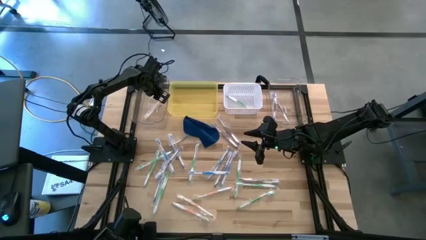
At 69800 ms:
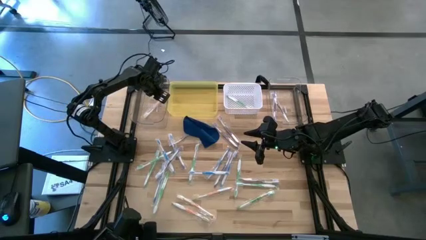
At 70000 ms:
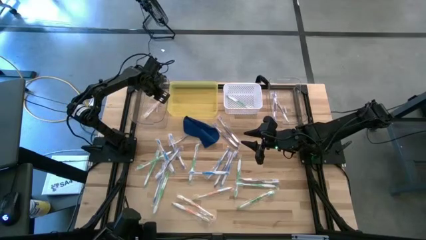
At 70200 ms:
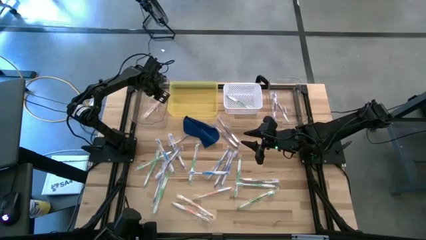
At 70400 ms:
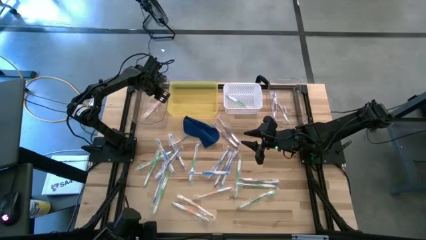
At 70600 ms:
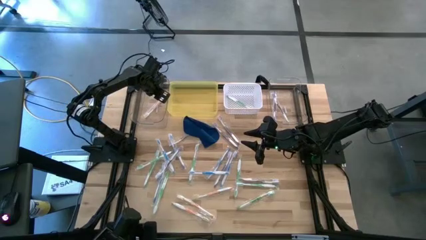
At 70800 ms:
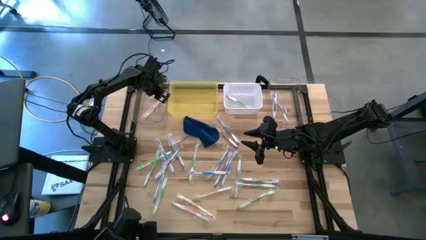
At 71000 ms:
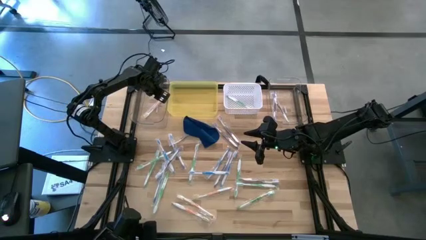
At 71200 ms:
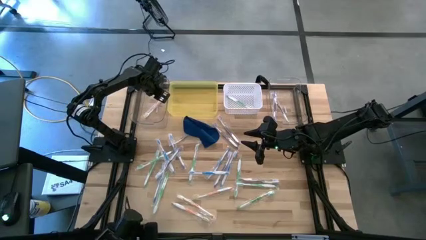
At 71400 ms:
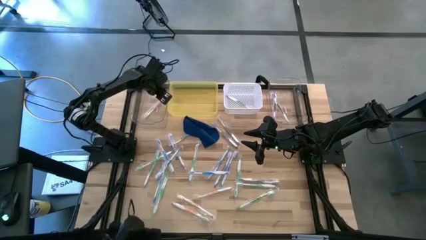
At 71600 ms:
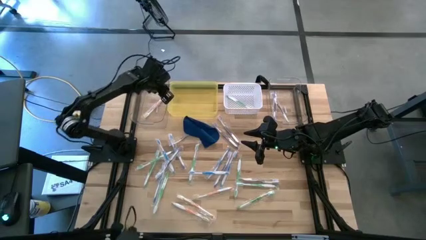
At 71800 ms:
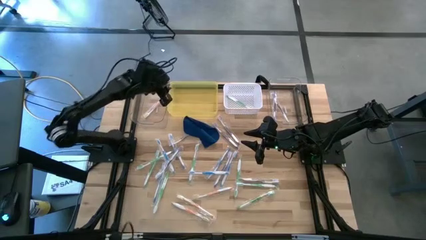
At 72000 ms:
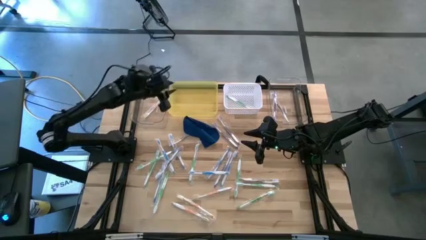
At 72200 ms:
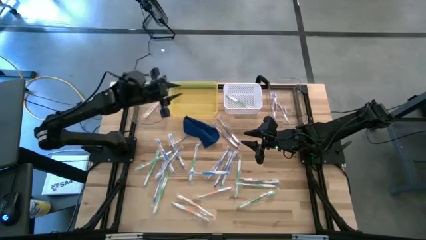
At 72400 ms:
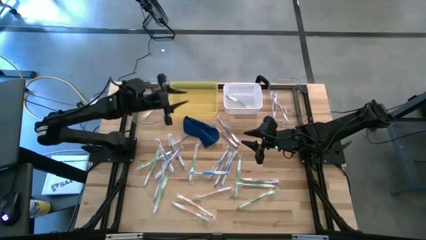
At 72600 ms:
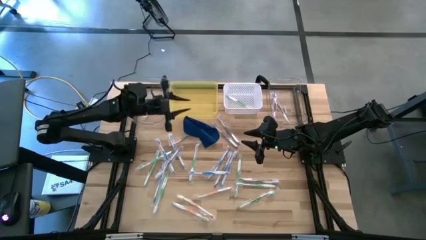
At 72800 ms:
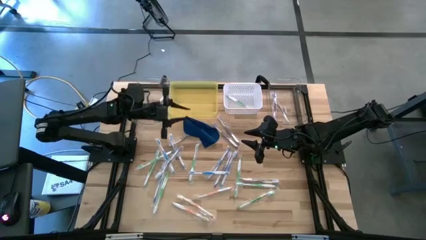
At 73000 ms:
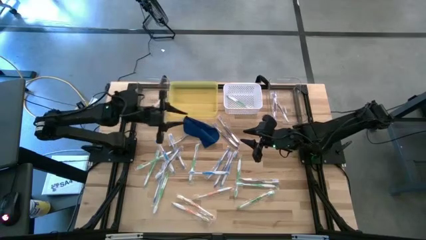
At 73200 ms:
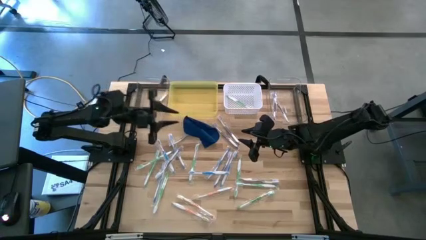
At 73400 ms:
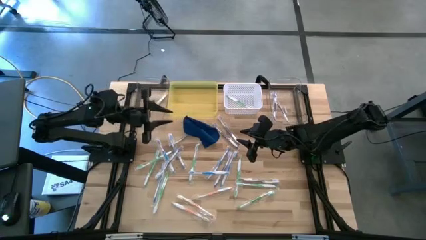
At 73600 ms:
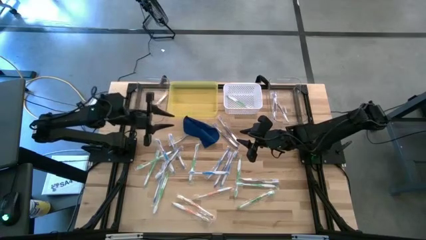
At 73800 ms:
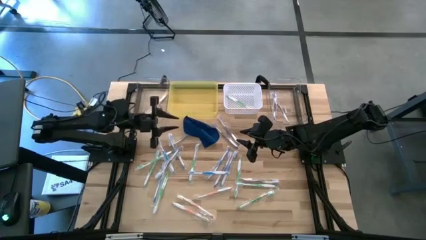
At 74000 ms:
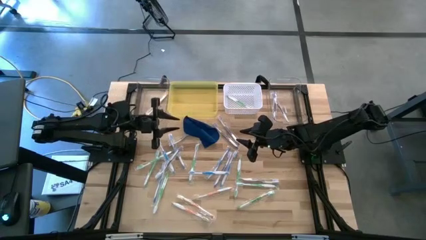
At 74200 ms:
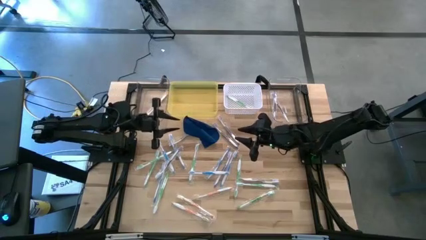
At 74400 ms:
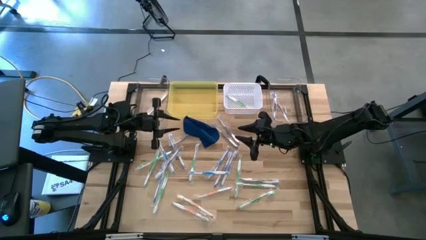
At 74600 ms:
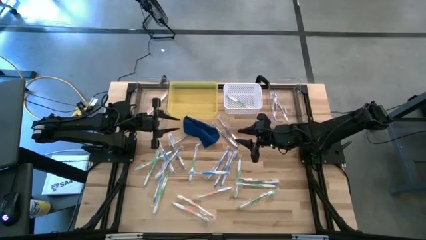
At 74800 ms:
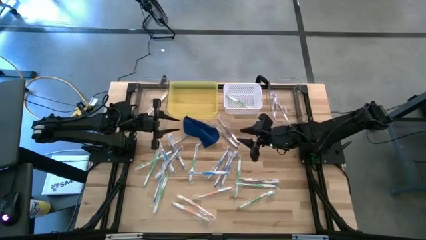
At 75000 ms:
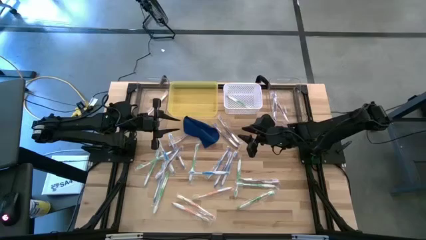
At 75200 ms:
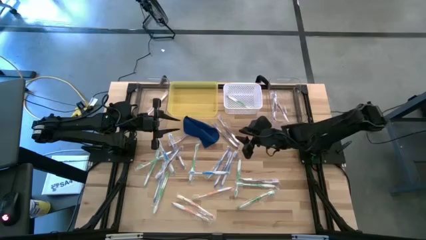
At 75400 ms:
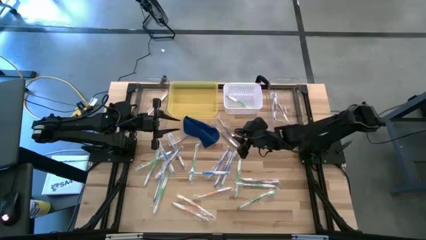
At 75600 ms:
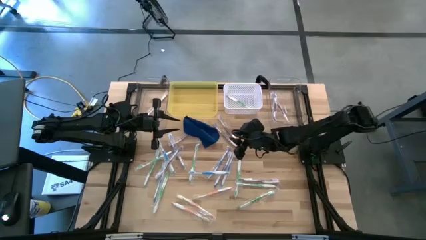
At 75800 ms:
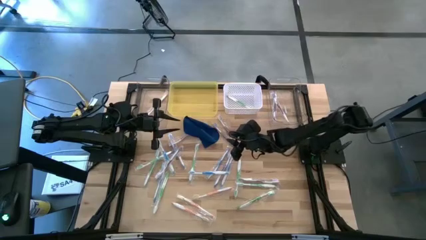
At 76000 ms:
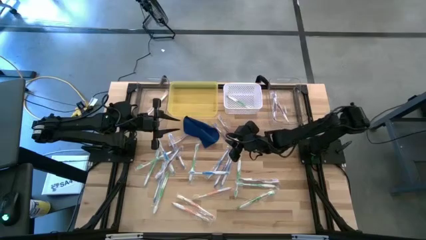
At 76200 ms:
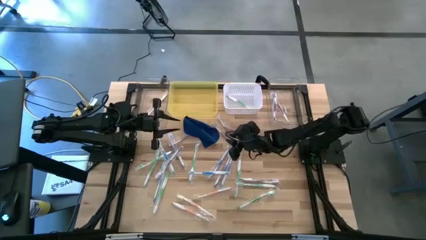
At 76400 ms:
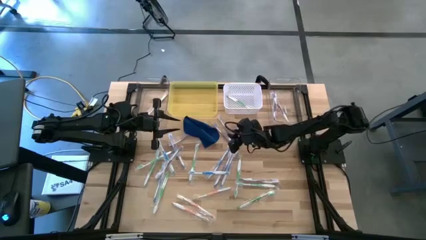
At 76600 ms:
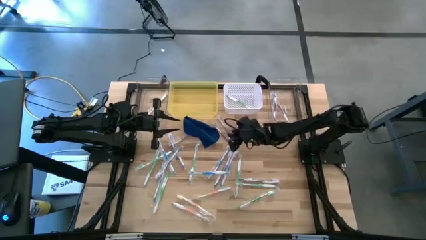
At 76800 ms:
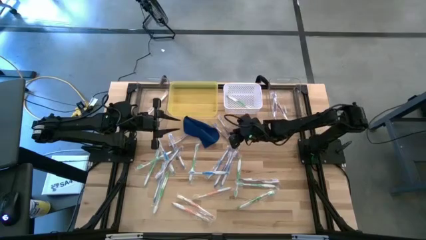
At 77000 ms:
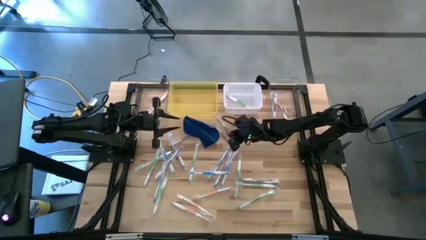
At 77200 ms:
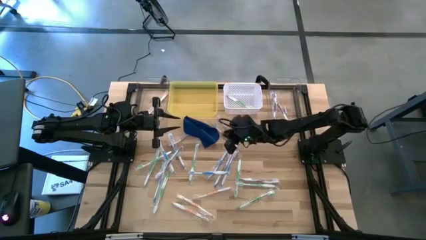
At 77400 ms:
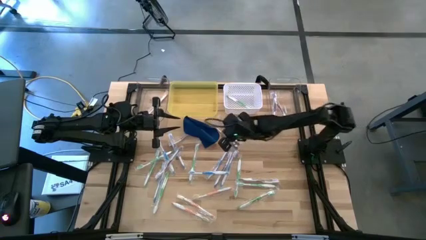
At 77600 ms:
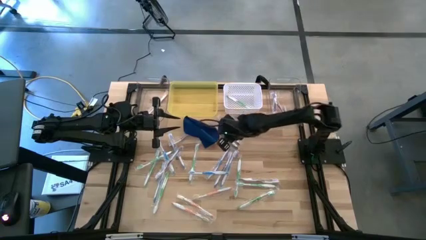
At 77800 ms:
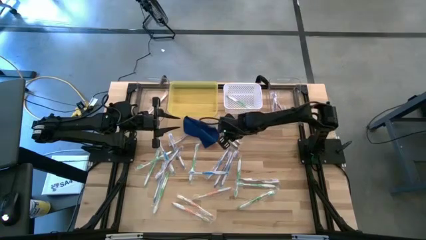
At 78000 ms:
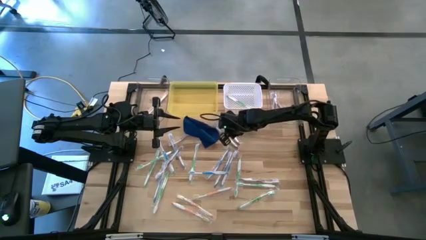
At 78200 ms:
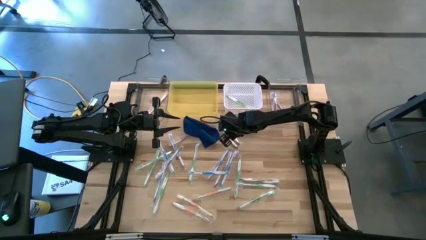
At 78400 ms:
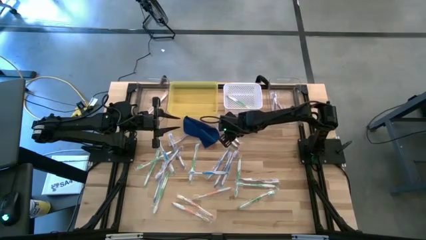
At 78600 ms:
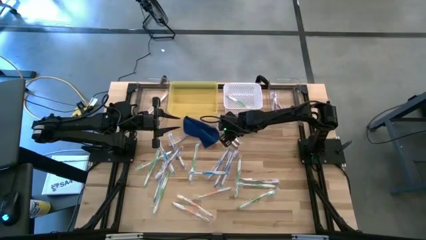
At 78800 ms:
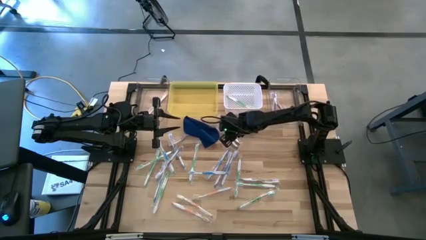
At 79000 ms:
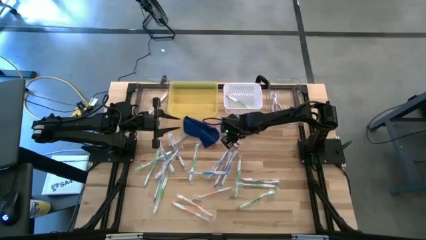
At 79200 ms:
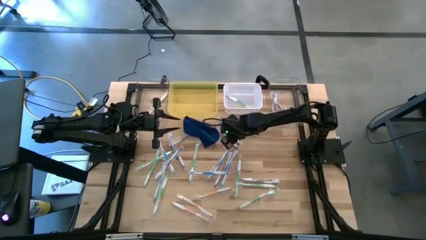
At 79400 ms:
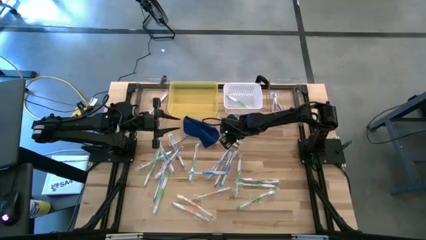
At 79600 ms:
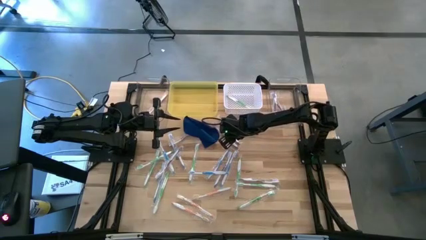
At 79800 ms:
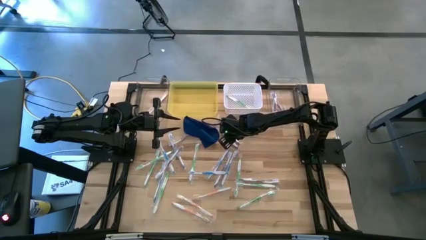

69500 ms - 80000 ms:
Task: Pick & Place Toothbrushes
Put the violet toothbrush into the right transparent bin

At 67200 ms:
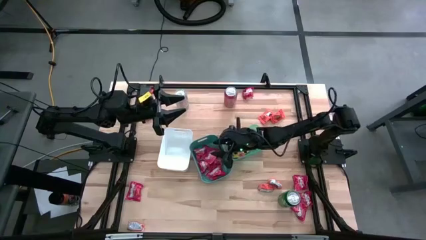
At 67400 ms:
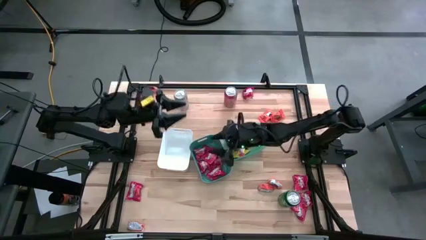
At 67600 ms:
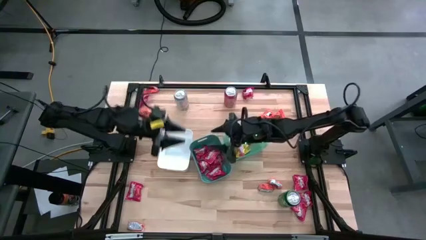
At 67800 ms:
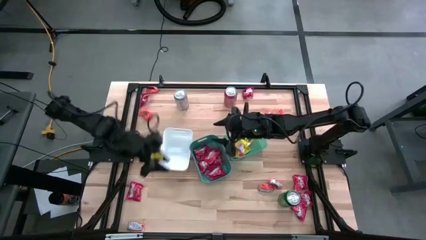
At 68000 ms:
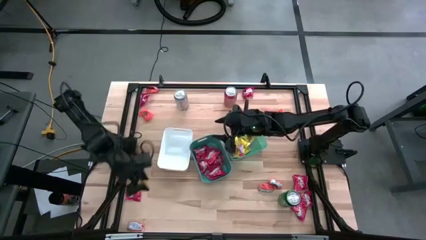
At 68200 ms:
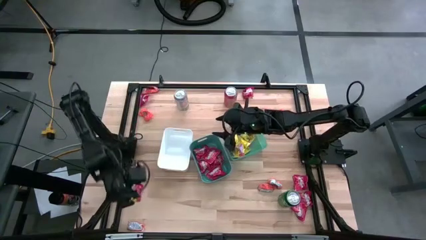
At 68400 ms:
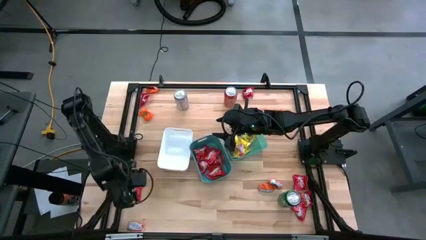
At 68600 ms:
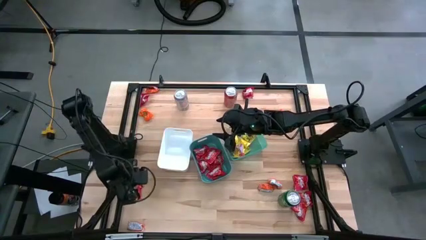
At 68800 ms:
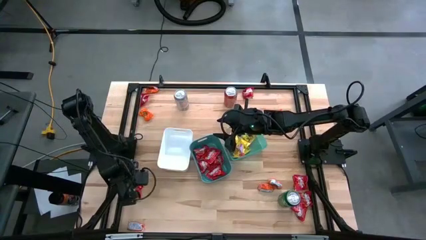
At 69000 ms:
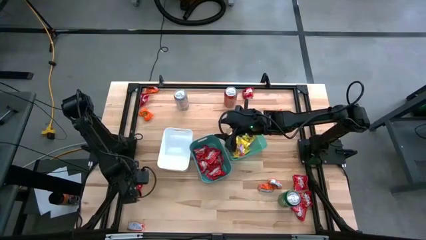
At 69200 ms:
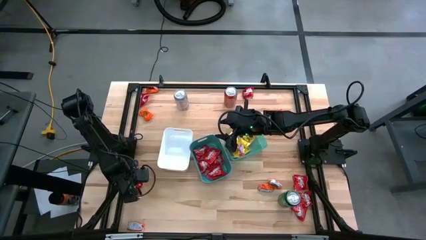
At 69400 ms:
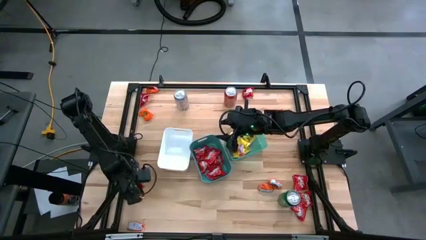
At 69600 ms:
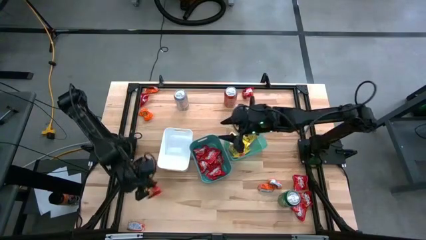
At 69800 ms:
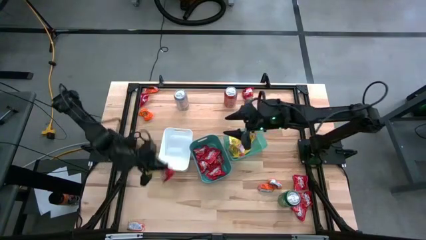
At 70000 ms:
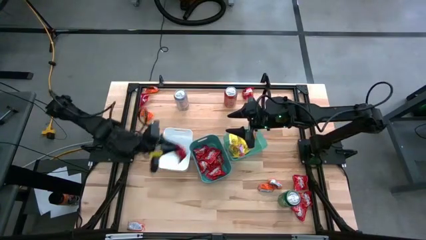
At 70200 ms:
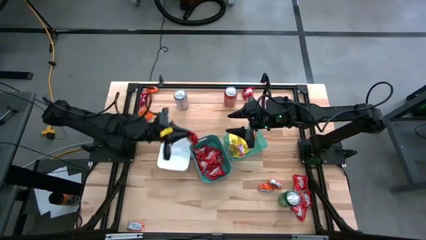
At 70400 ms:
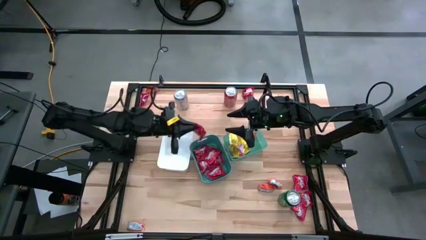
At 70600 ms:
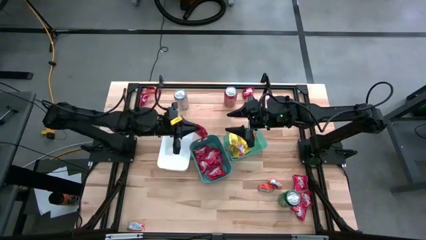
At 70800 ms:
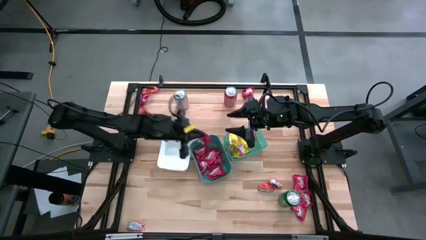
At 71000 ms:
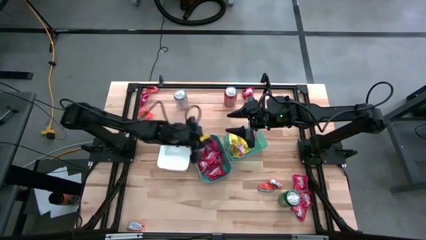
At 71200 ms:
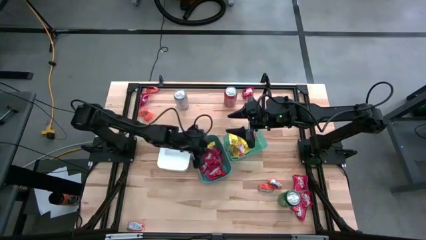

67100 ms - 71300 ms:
Task: Sort candy
Put the red candy into the green bin

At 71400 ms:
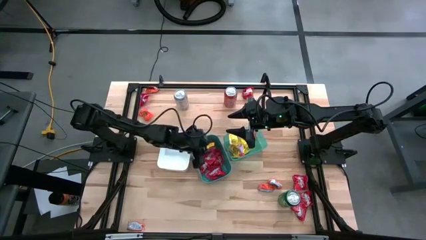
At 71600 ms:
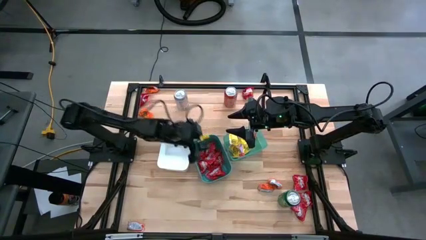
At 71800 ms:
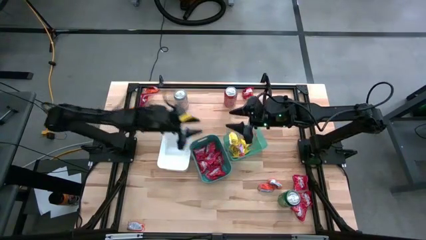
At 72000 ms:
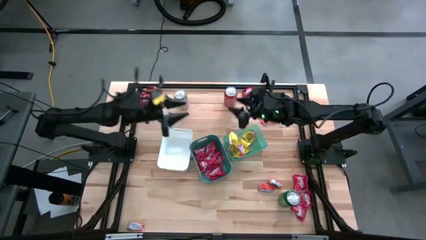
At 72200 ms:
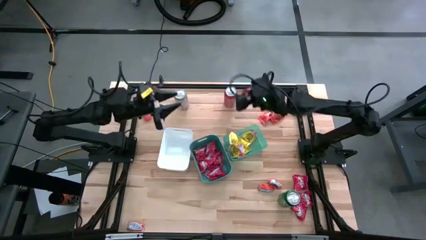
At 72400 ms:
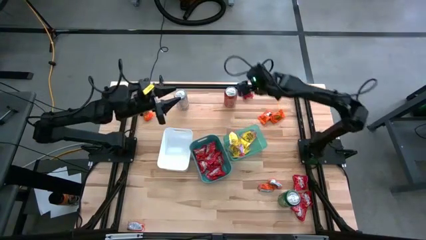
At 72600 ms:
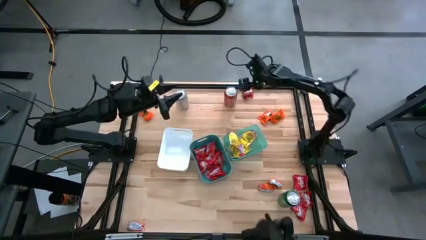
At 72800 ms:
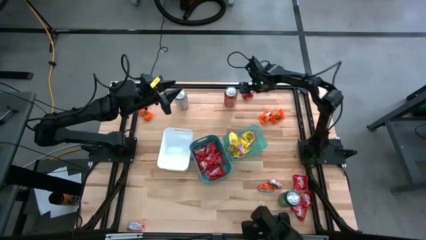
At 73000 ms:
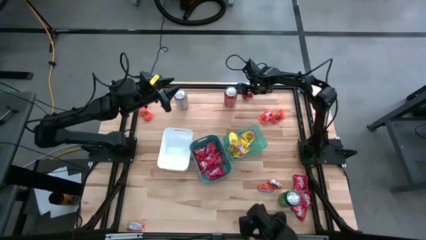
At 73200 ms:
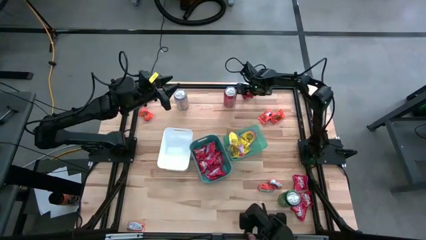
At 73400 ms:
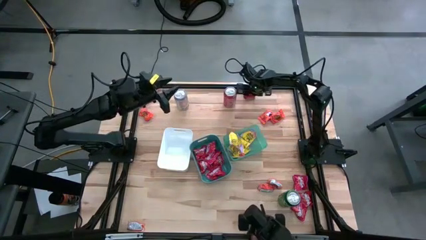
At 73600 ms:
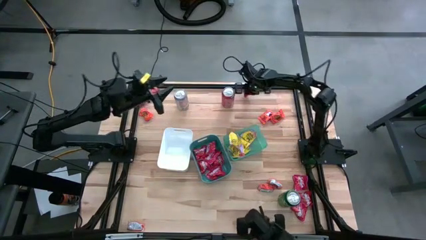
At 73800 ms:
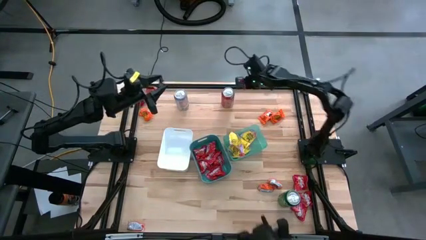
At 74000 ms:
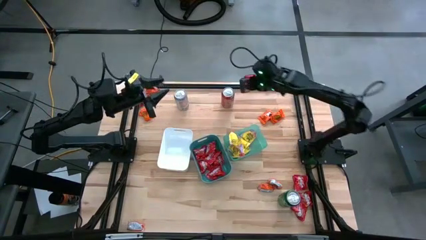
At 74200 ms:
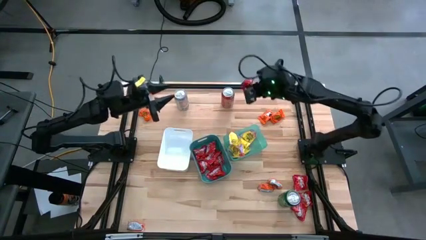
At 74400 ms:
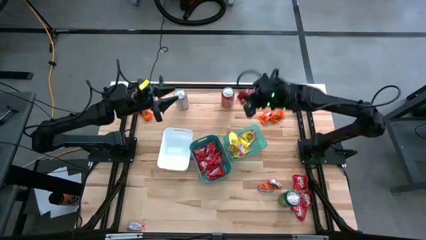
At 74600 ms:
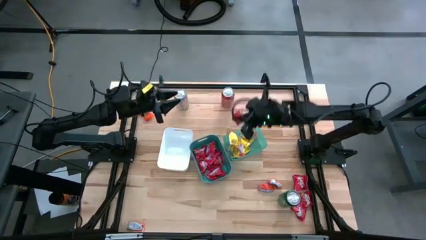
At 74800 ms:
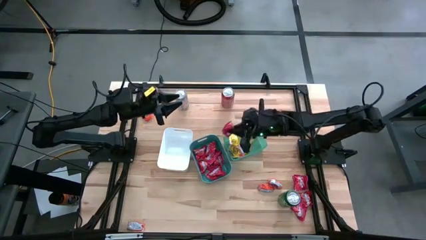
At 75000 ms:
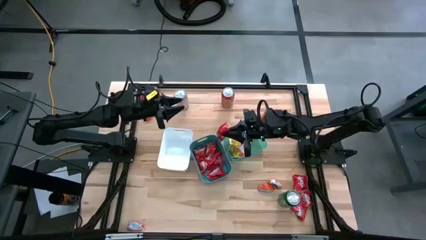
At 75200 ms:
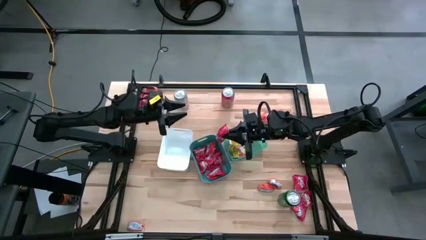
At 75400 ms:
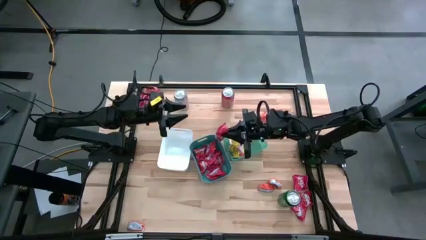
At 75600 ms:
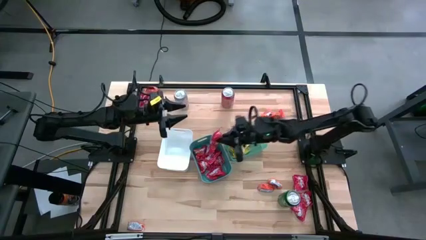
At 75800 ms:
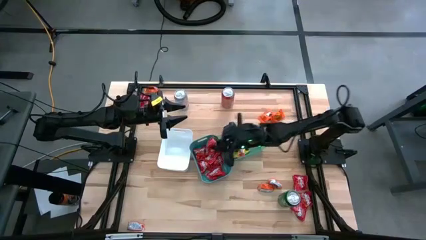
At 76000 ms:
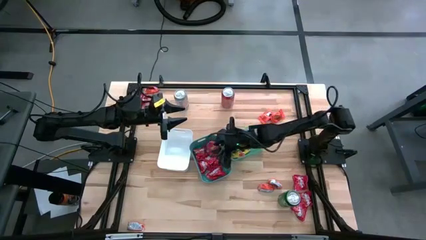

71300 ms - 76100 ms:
Put the red candy into the green bin
